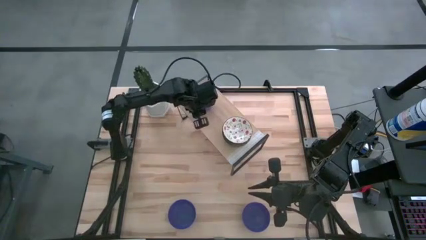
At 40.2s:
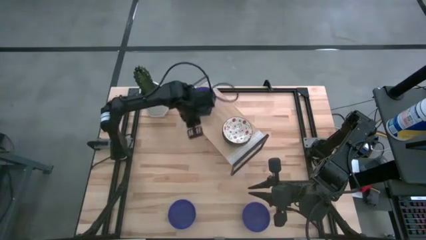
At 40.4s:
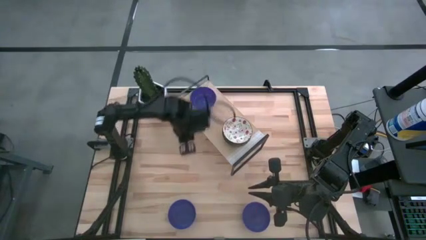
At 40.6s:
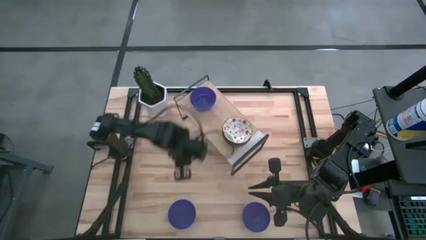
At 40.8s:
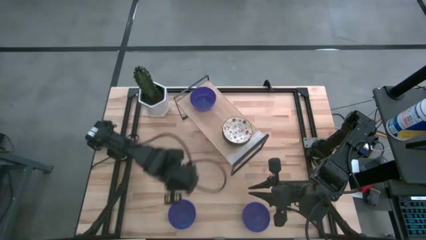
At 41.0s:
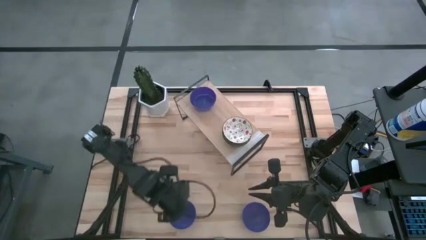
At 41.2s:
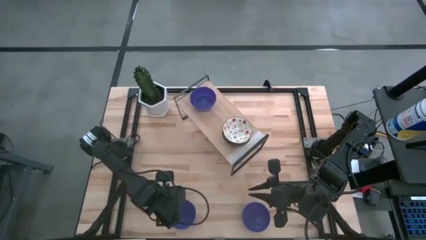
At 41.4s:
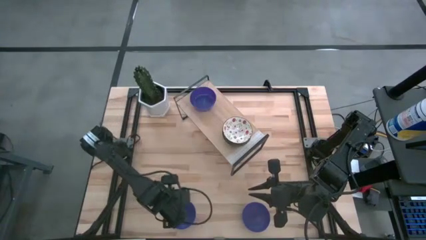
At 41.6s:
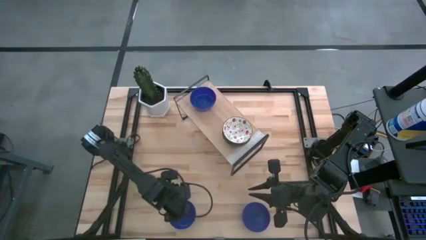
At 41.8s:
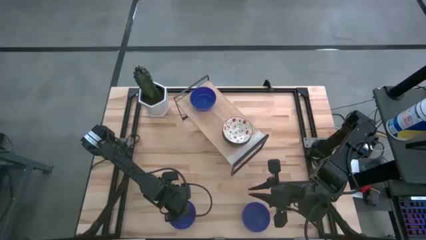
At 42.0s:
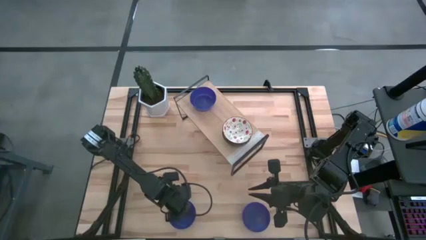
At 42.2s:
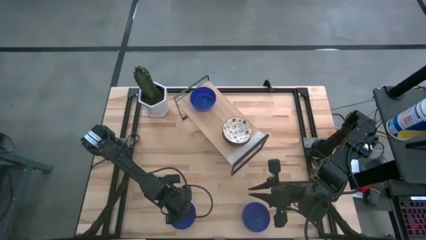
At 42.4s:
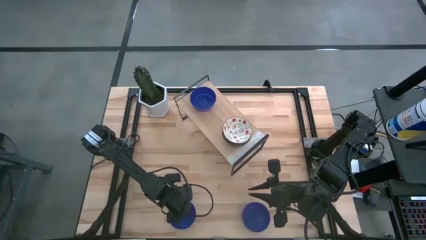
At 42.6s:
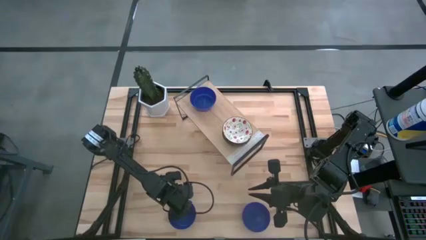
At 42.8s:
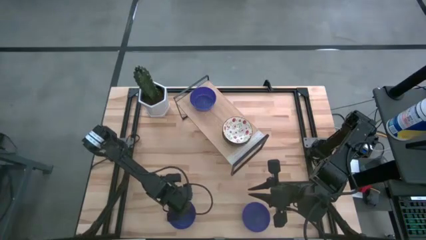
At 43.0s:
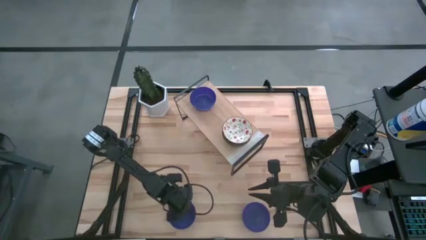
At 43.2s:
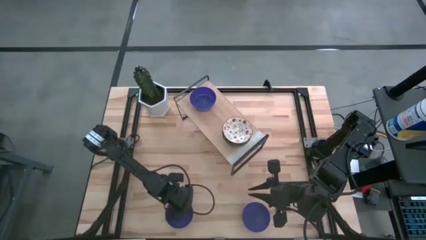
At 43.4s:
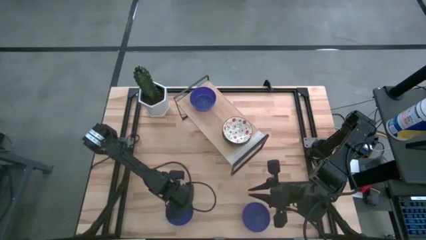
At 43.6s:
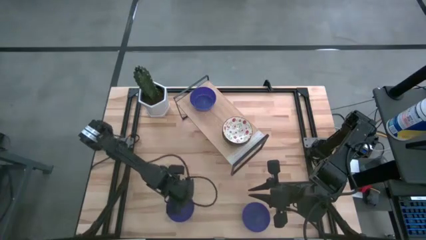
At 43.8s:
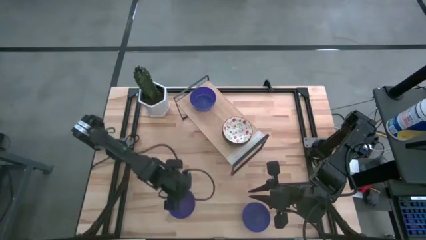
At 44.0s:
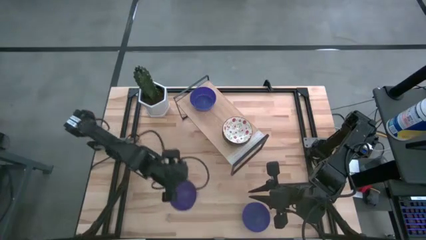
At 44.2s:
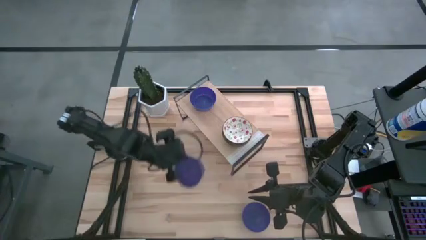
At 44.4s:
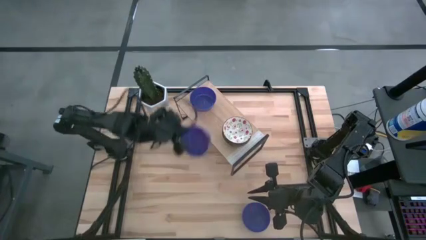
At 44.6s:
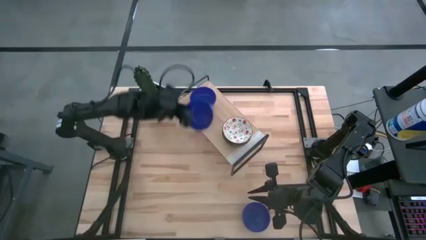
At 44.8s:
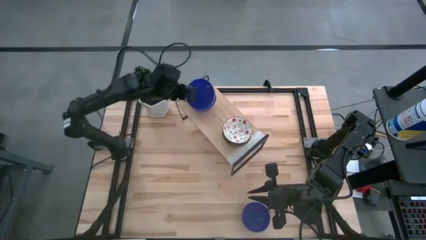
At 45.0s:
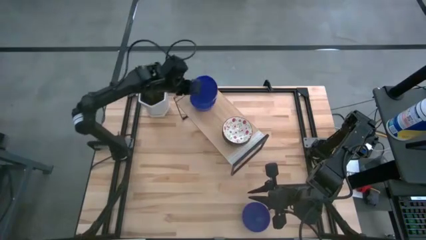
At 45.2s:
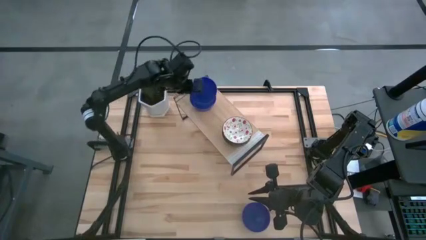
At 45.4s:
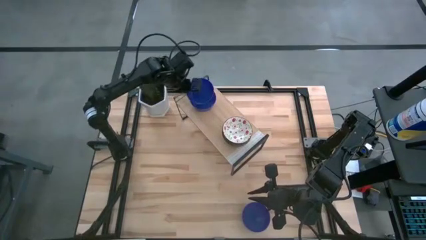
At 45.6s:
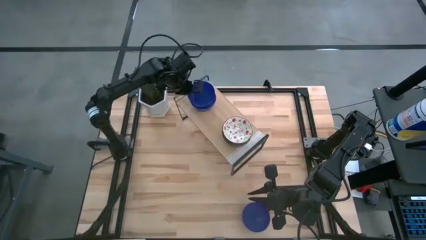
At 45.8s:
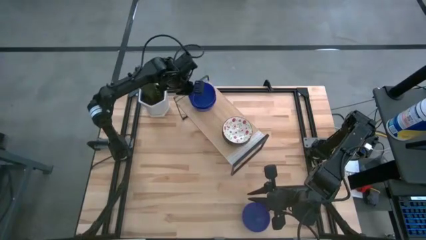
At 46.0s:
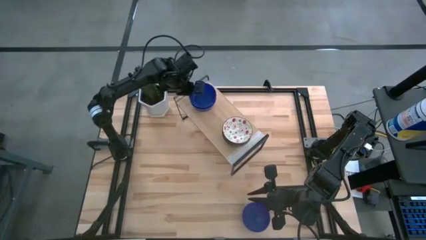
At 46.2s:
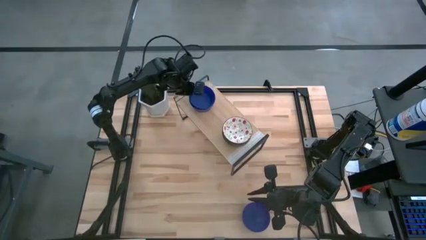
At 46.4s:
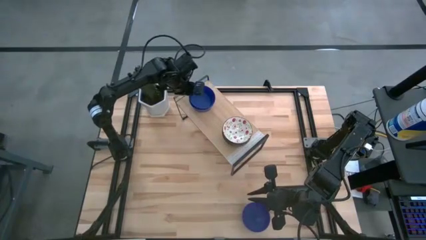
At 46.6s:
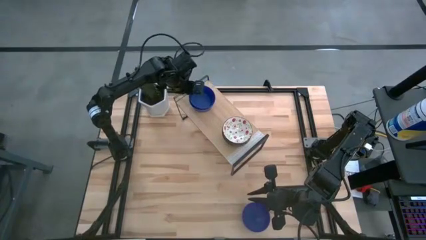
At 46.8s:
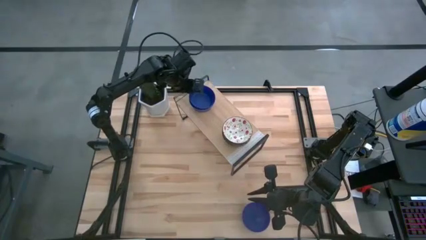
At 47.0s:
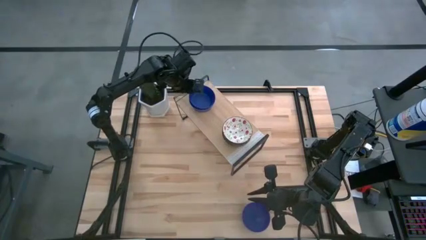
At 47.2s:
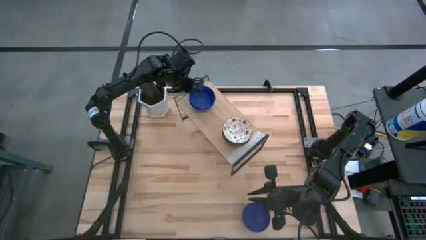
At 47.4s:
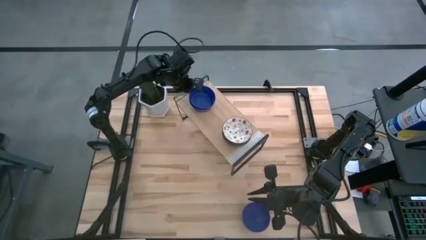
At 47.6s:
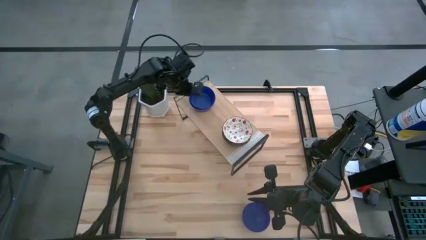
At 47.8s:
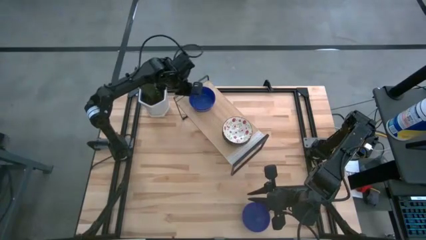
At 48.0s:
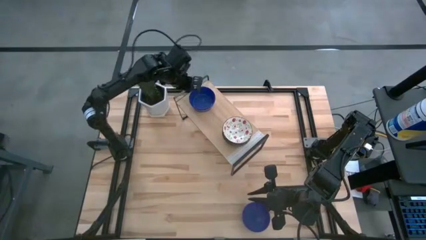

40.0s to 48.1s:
Task: Pick & Place Mini bowls
Stack the left blue bowl on the other blue bowl on the shelf

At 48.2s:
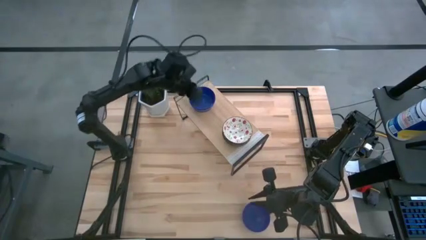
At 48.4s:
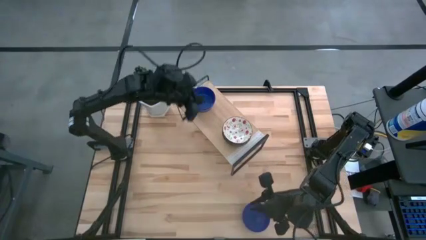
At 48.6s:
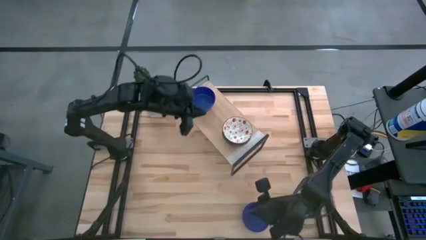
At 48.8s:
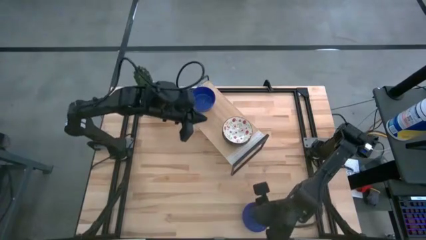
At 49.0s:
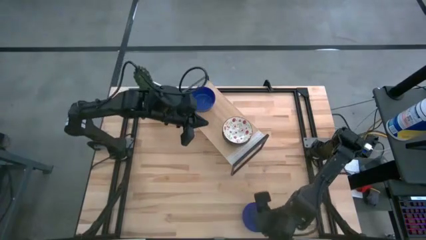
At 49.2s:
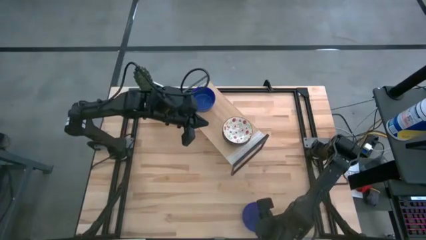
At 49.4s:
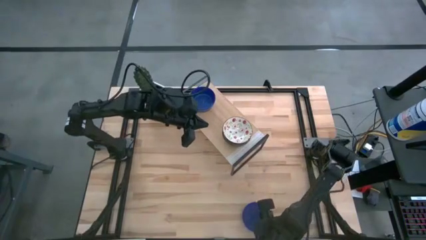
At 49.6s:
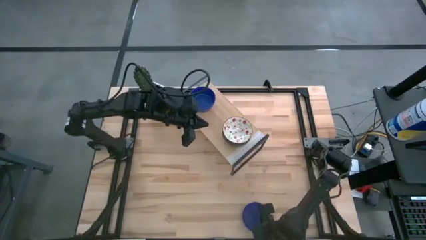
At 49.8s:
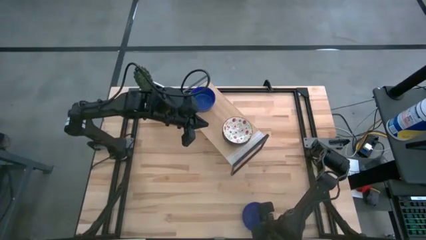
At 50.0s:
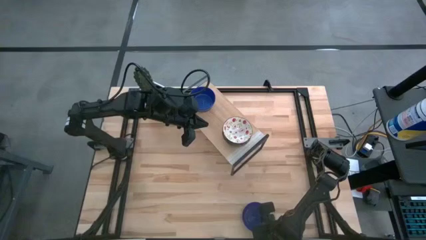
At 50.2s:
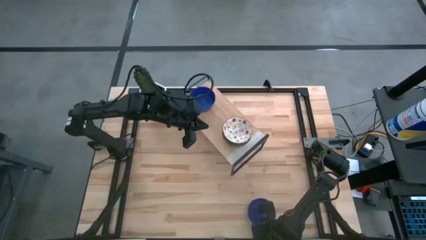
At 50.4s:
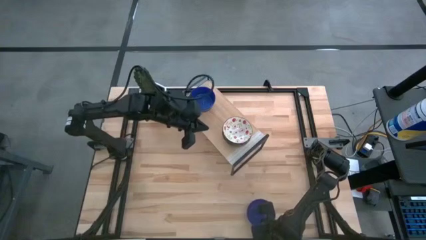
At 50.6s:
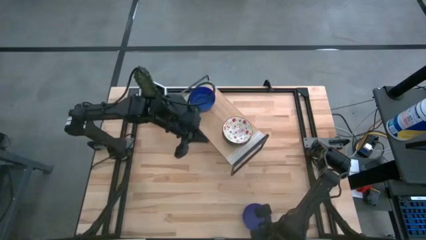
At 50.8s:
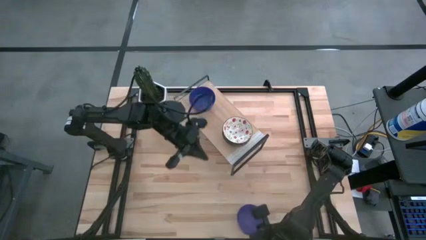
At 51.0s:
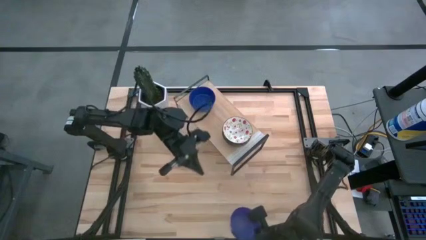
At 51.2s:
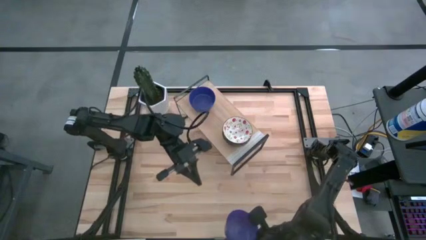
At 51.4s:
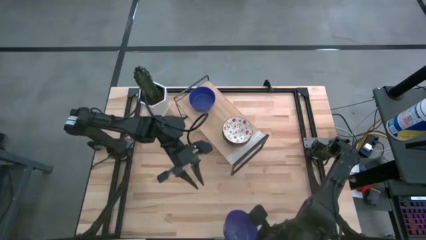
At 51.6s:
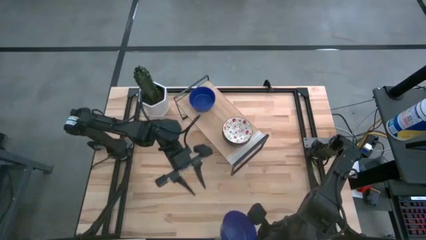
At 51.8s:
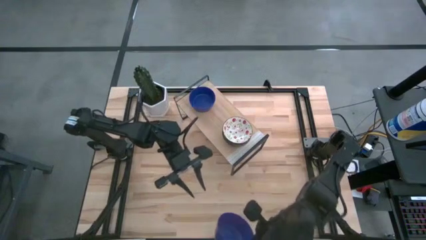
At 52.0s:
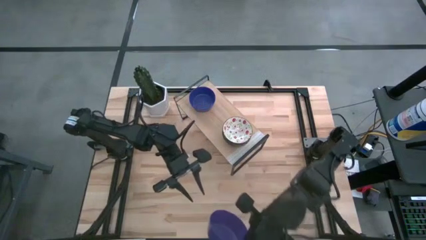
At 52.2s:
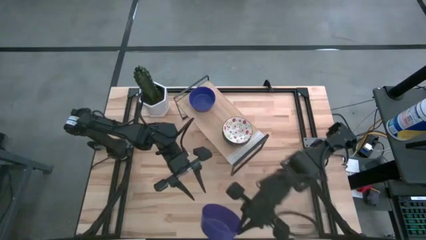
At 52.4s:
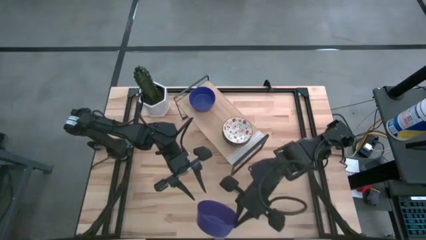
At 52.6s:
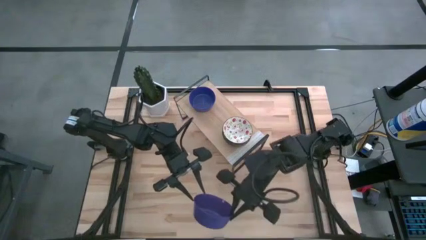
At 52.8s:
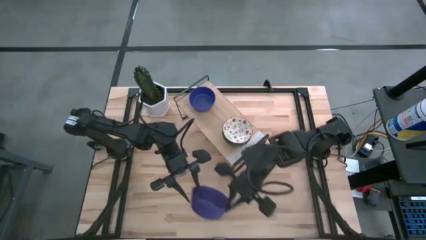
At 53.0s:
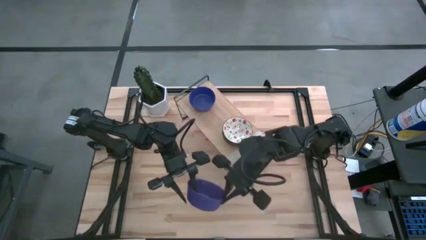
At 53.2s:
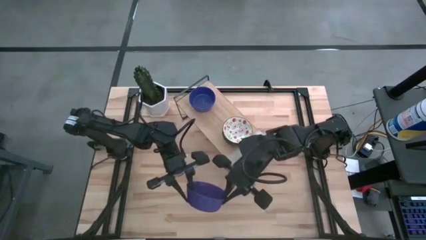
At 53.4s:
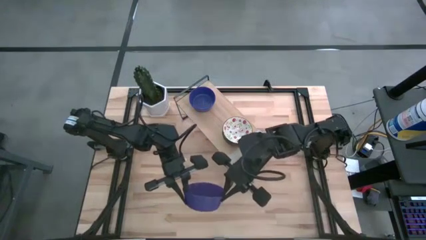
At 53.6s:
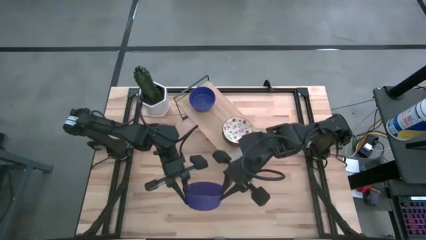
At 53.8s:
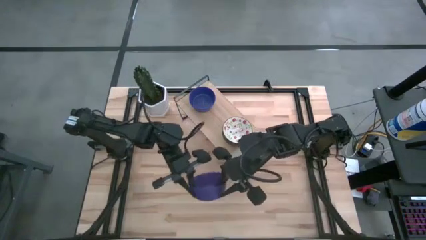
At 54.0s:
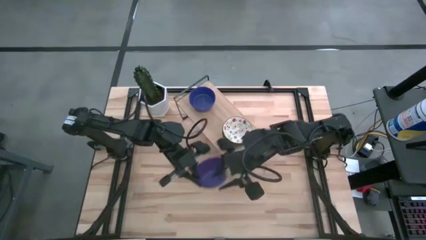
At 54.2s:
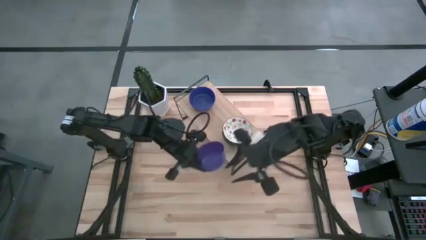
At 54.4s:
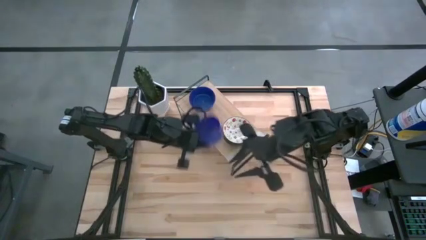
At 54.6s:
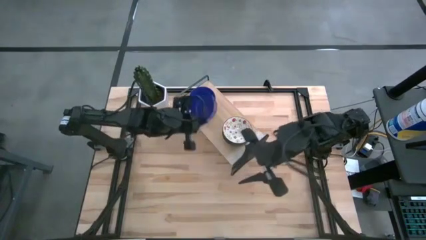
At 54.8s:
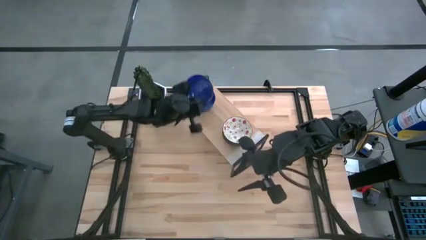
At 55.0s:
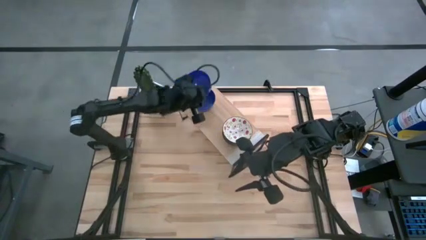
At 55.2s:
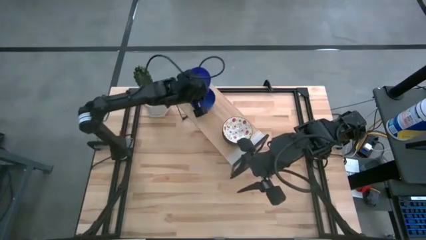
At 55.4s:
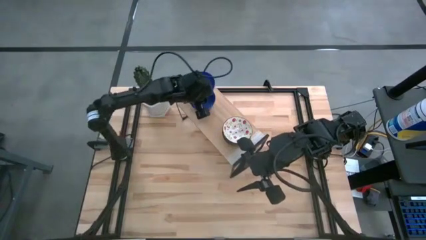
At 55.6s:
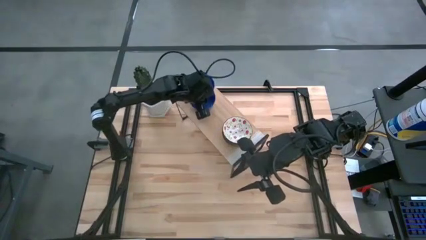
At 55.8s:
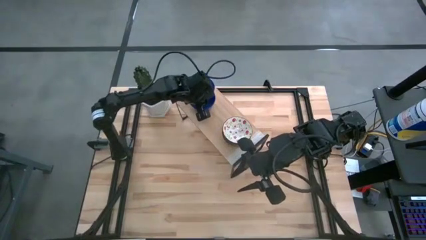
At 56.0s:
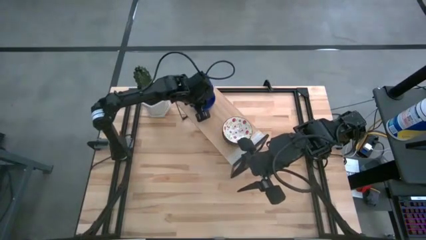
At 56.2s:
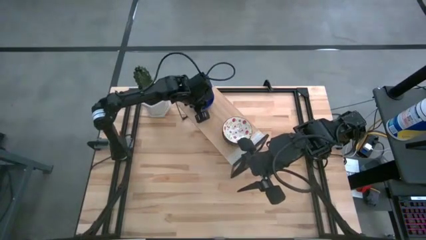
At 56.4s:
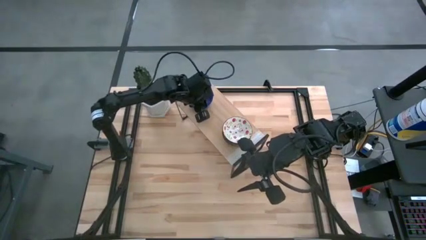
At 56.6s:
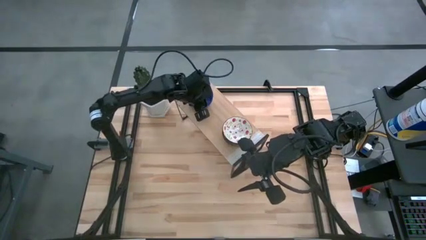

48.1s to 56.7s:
Stack the blue bowl on the other blue bowls on the shelf
